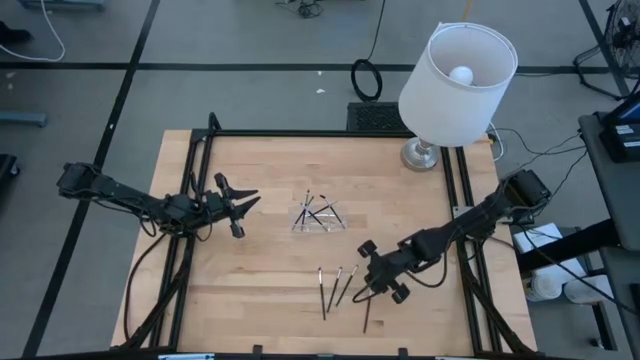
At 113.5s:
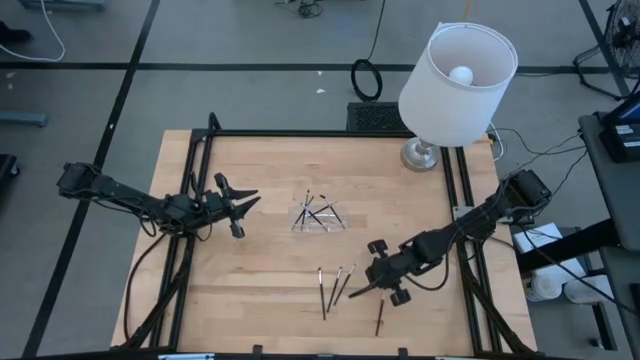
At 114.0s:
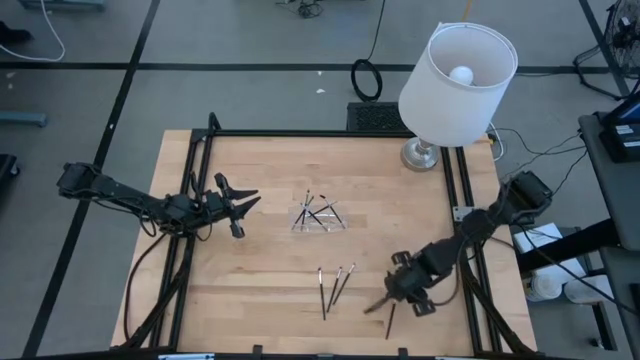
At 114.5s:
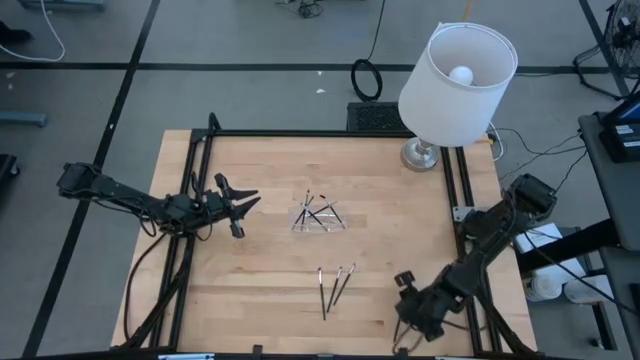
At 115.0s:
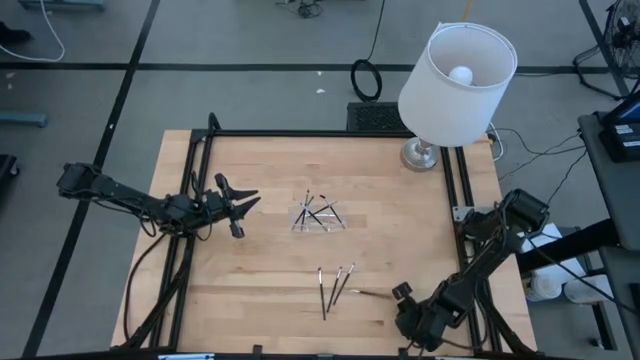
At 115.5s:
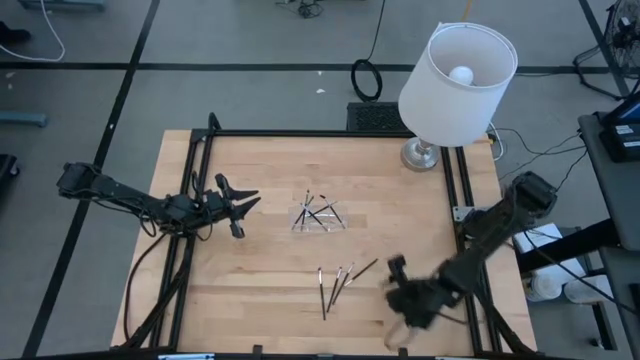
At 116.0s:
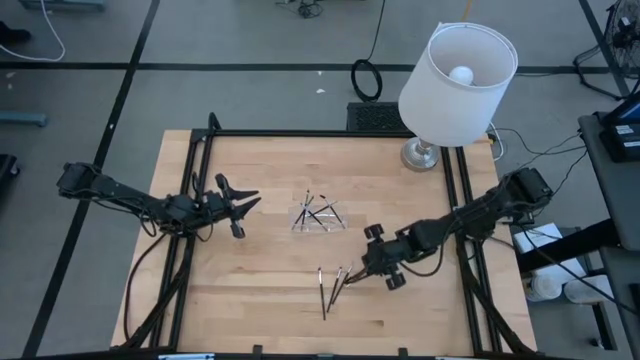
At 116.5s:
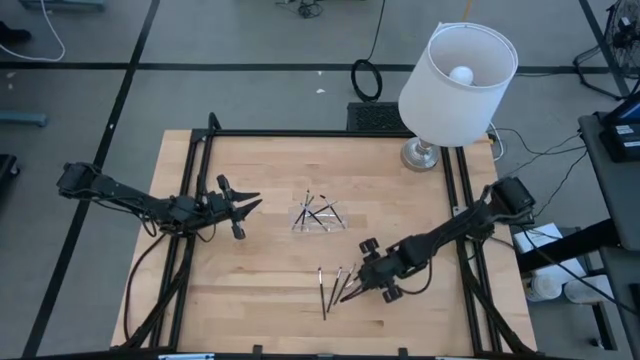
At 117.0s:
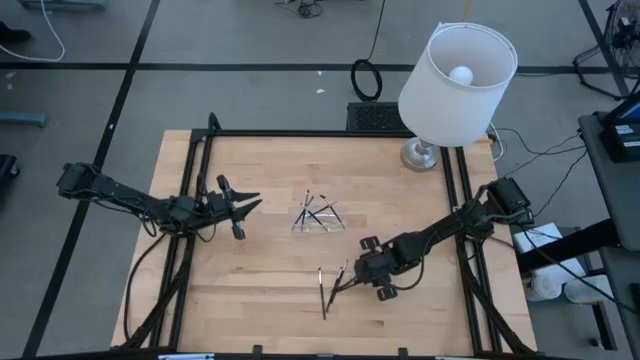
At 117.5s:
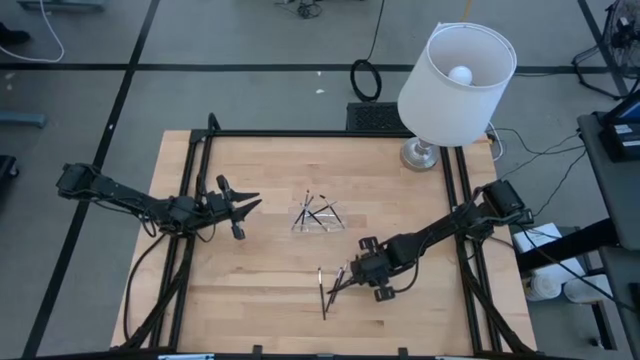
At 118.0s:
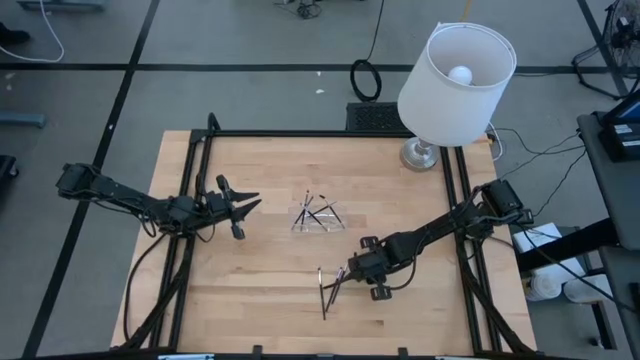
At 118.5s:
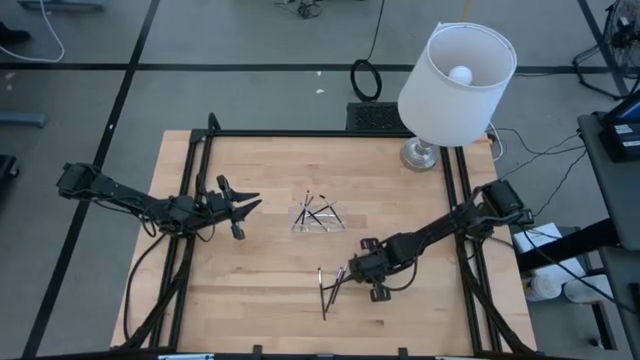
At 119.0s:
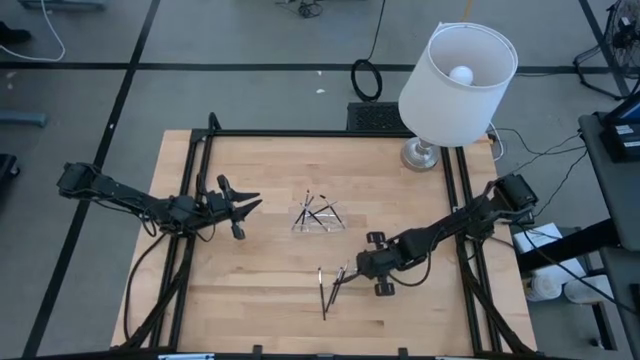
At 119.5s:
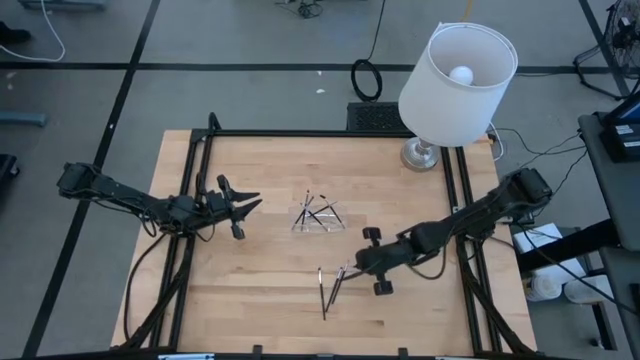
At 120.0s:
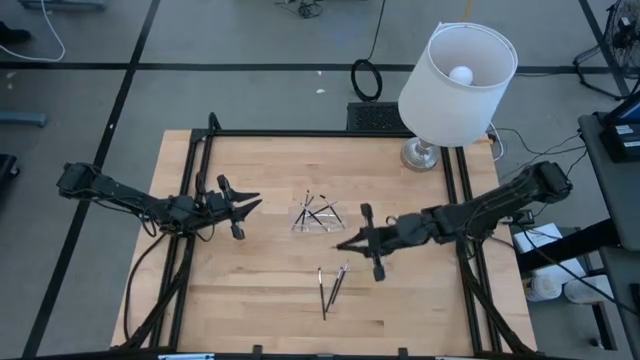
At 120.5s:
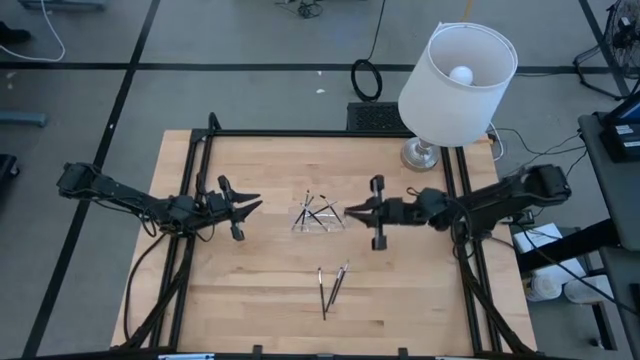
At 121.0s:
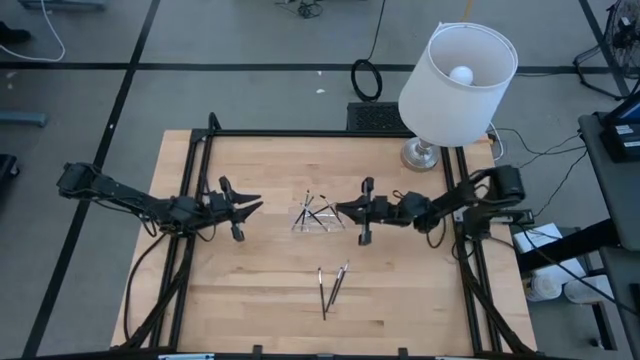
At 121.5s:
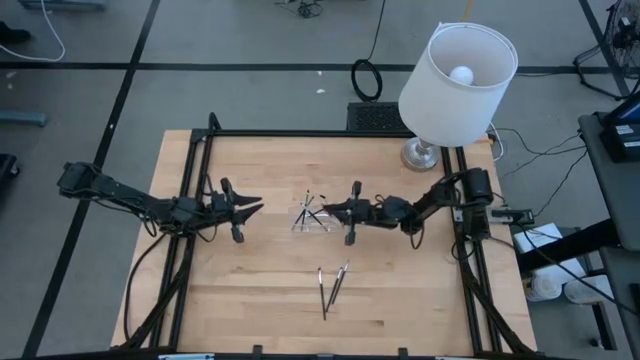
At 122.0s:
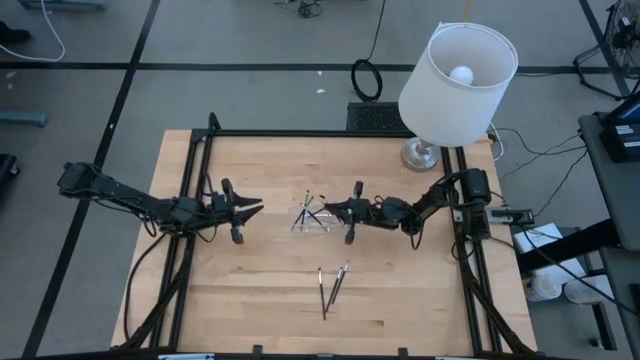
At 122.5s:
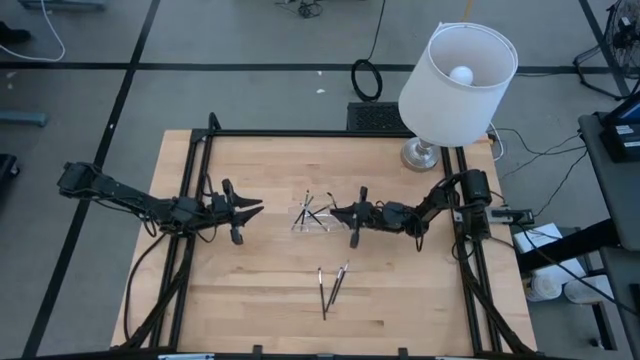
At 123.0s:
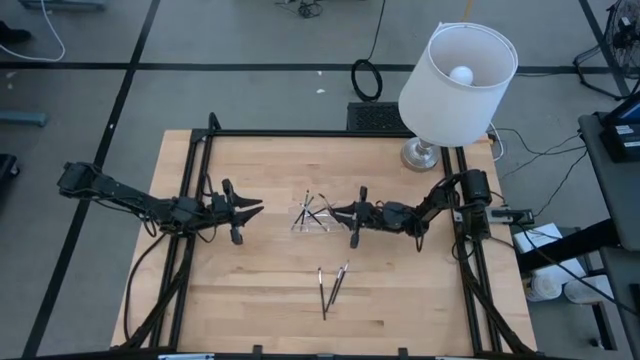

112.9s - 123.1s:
Task: Pick & Place Makeup Supplies
Put the makeup brush into the transparent organizer

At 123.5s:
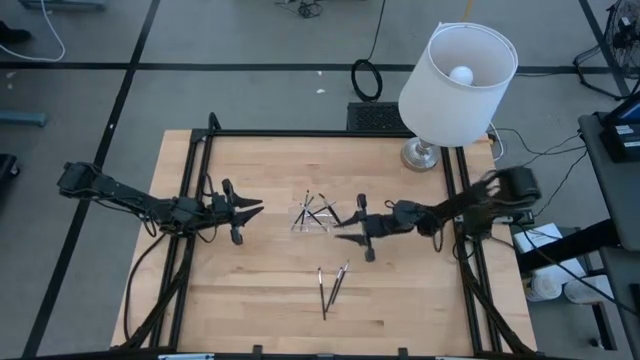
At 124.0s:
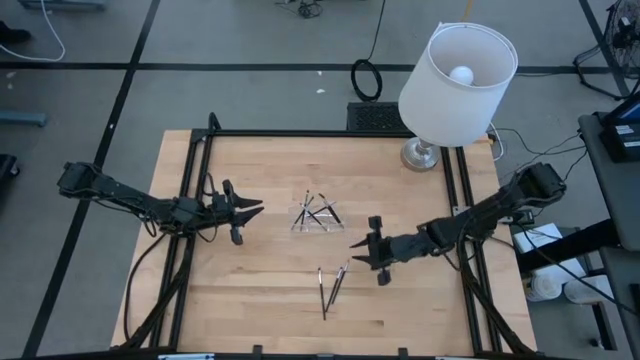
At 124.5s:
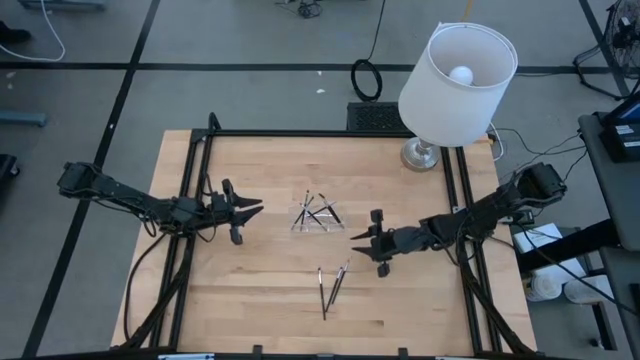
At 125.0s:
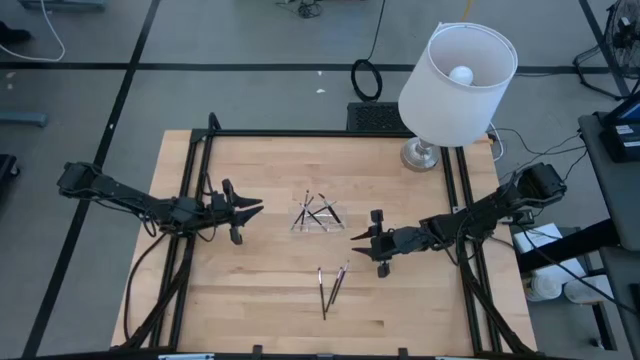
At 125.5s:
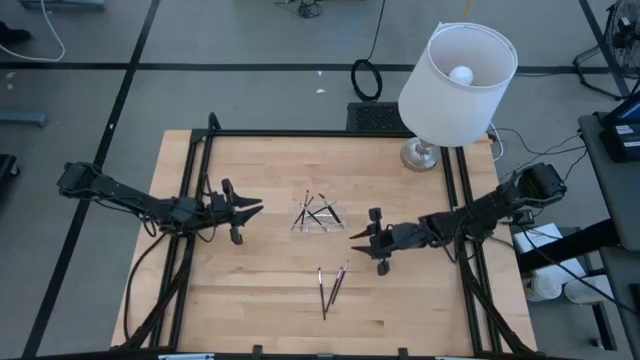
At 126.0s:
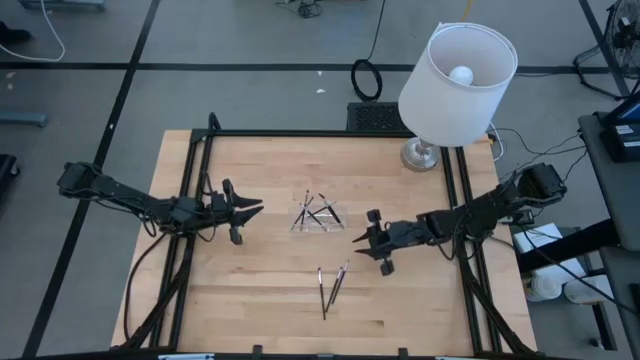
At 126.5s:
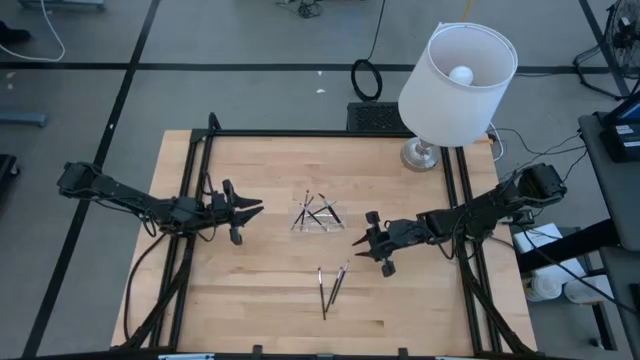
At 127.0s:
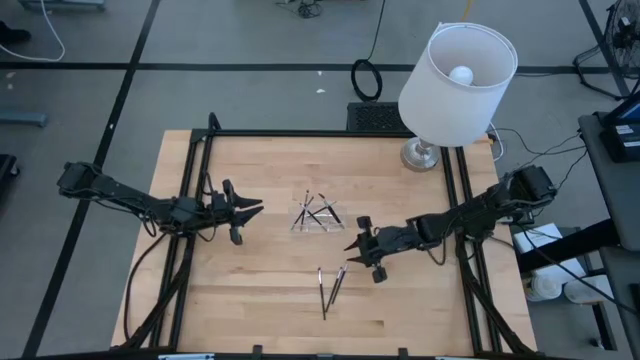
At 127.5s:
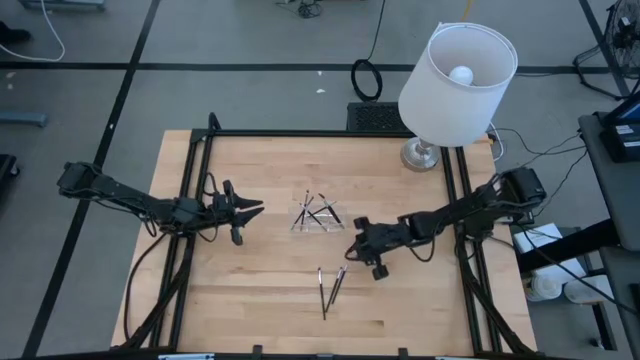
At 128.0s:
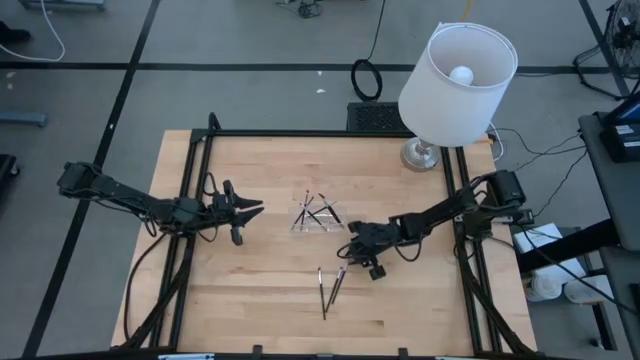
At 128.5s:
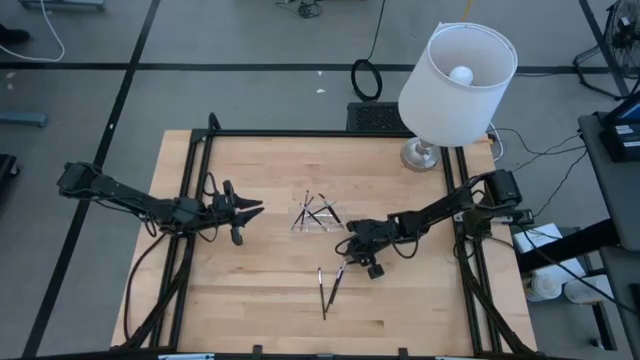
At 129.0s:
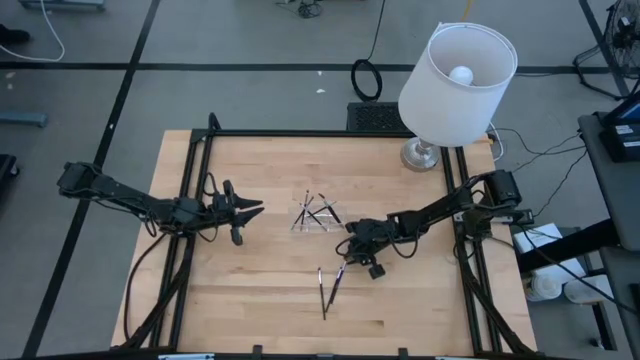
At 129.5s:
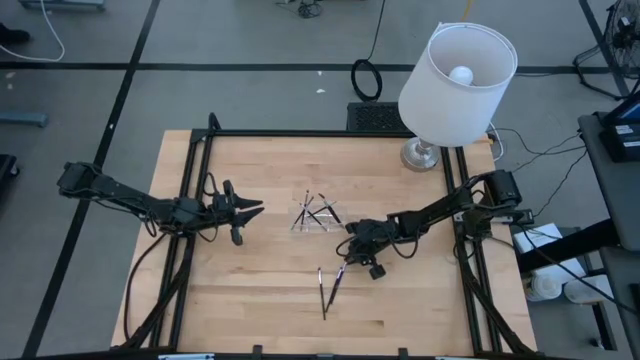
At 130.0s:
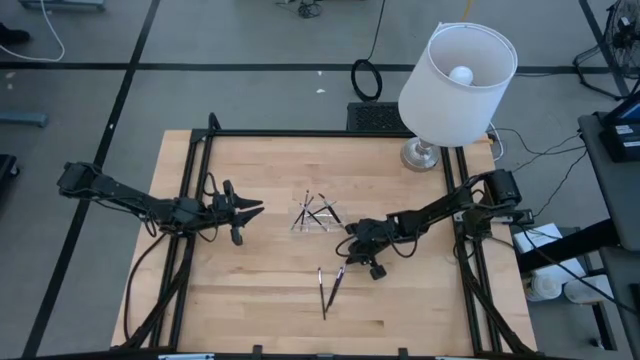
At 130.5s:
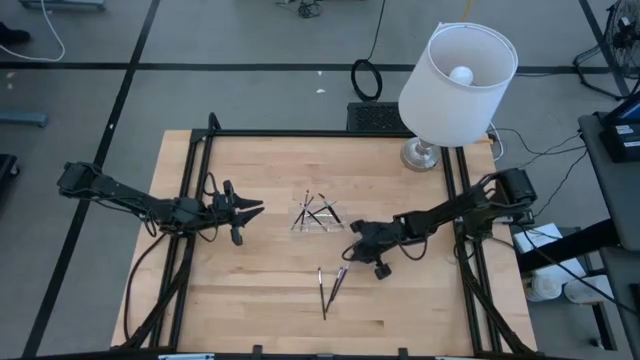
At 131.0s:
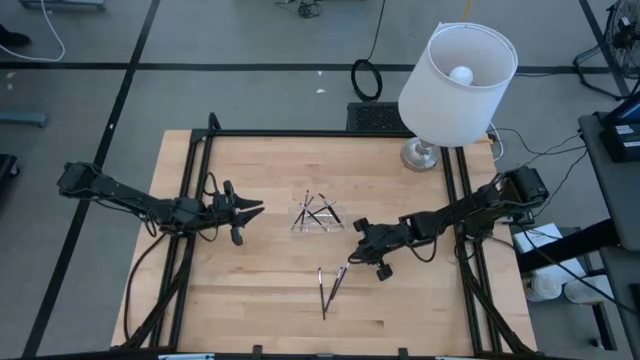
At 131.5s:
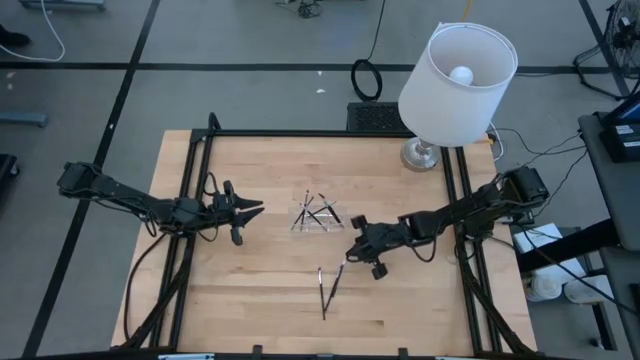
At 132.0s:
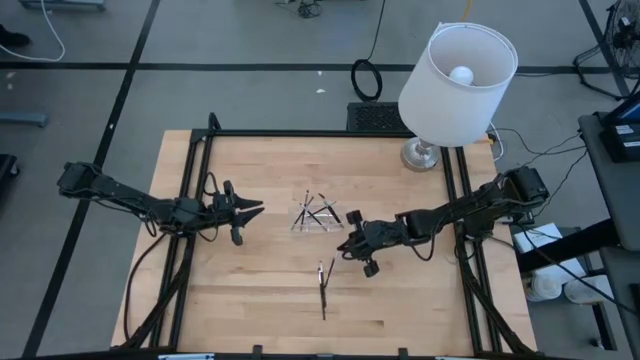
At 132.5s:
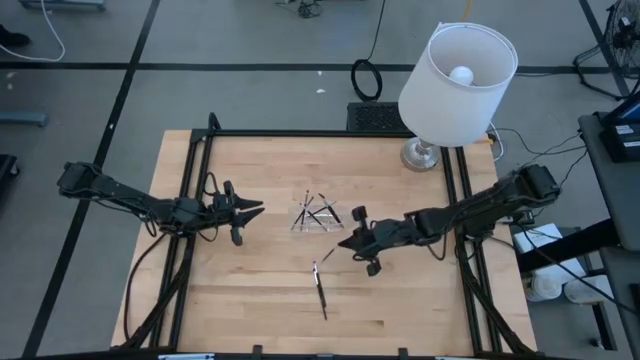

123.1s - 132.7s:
Put the makeup brush into the transparent organizer

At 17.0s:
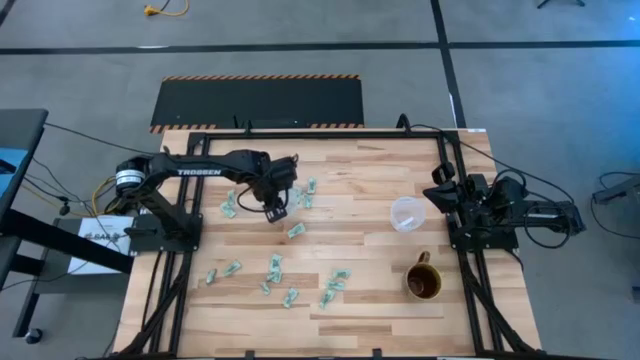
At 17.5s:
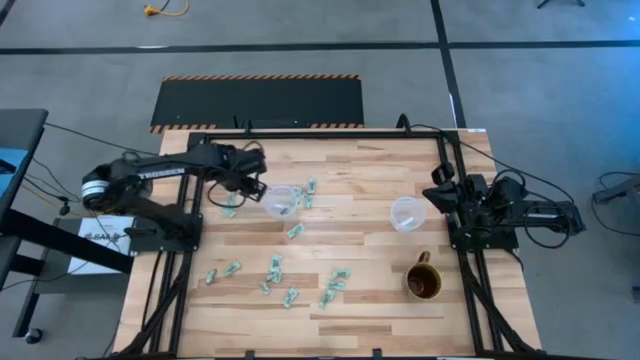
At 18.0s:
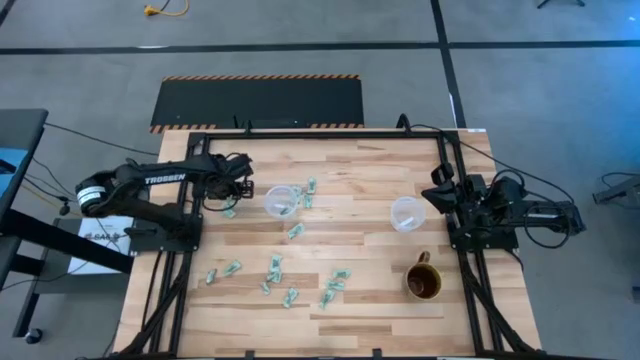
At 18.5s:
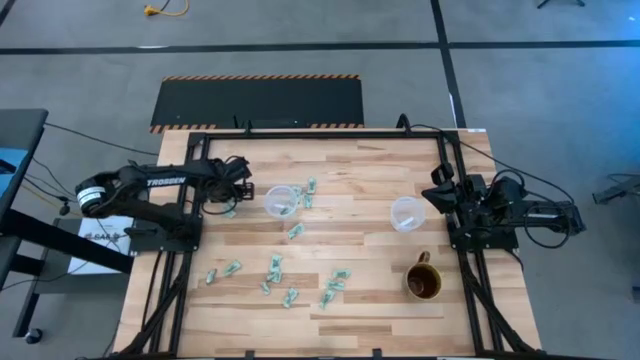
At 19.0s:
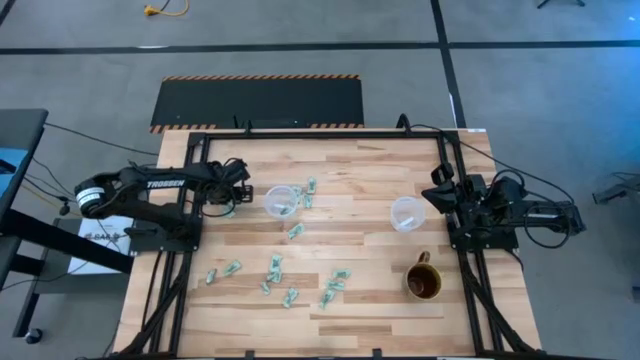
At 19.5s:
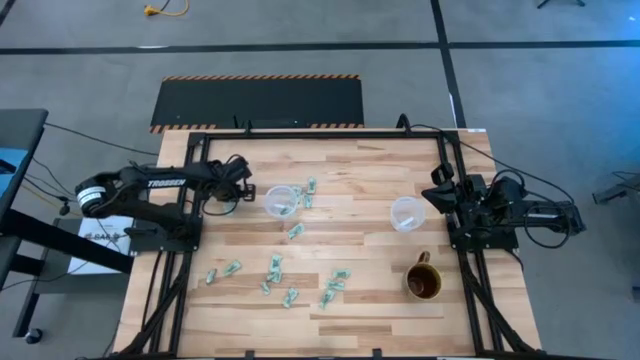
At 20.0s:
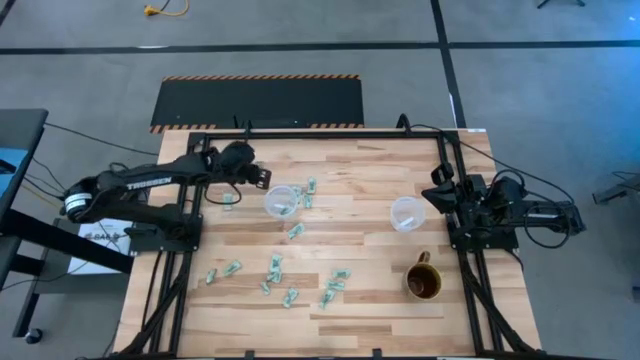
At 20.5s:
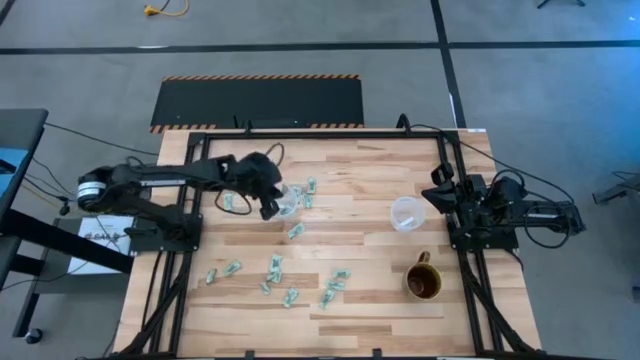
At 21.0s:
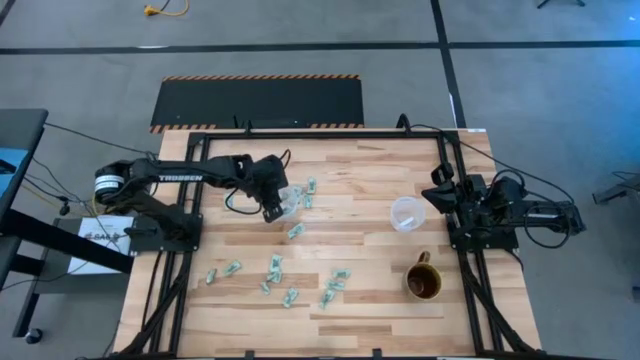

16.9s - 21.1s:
Task: Pick and place Stevia / Truvia into bins
Put the white stevia packet into the left transparent container
